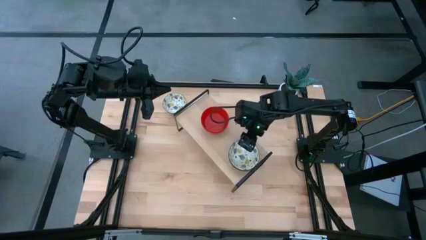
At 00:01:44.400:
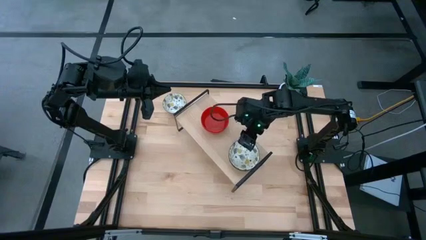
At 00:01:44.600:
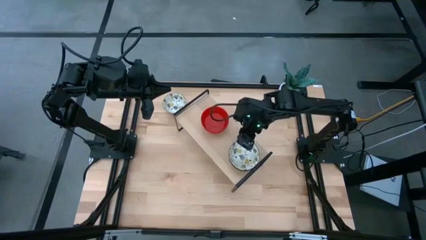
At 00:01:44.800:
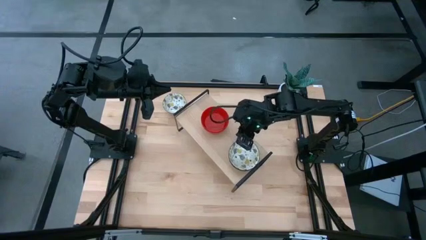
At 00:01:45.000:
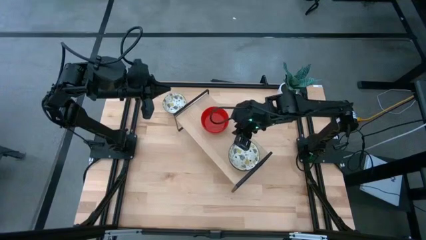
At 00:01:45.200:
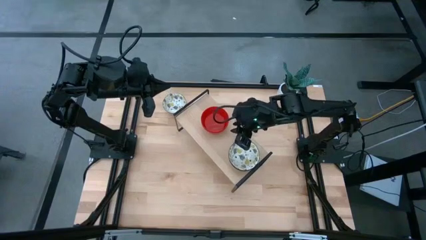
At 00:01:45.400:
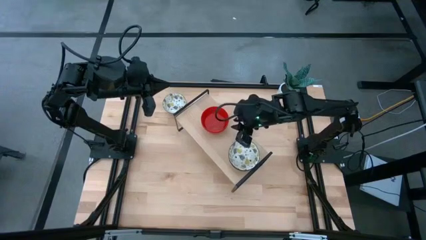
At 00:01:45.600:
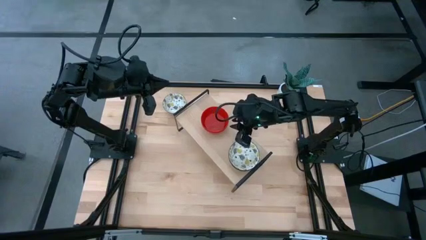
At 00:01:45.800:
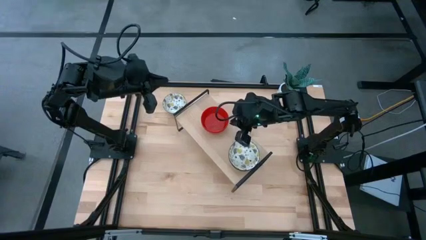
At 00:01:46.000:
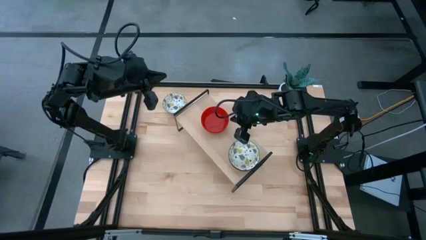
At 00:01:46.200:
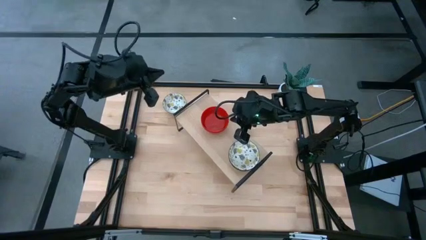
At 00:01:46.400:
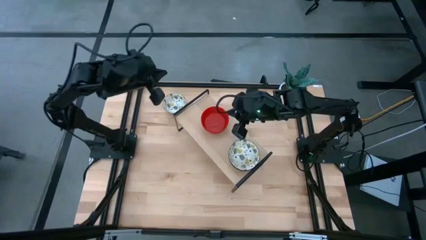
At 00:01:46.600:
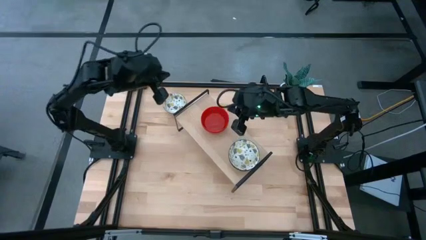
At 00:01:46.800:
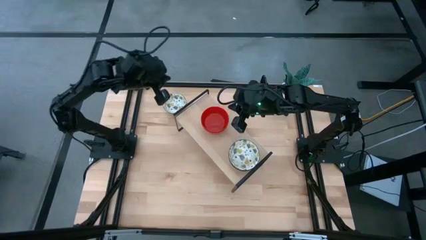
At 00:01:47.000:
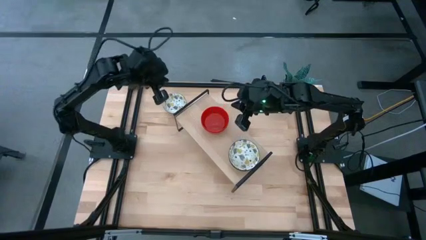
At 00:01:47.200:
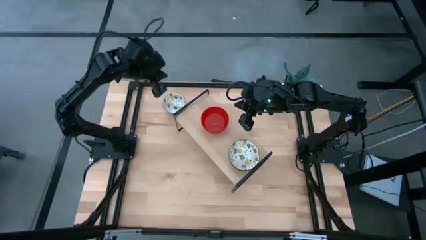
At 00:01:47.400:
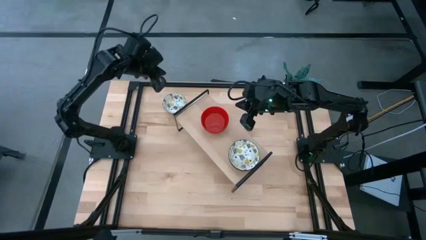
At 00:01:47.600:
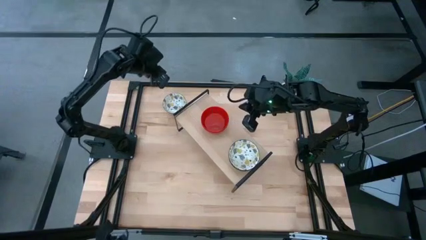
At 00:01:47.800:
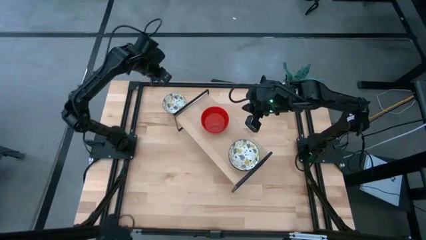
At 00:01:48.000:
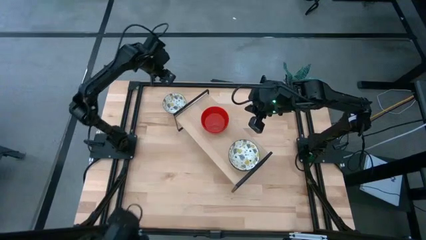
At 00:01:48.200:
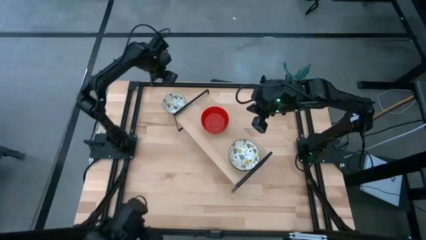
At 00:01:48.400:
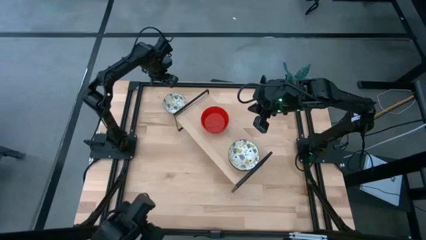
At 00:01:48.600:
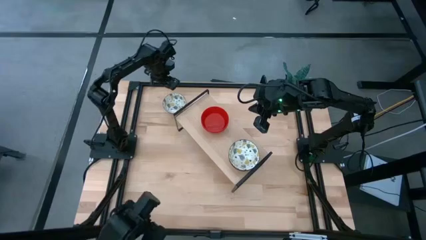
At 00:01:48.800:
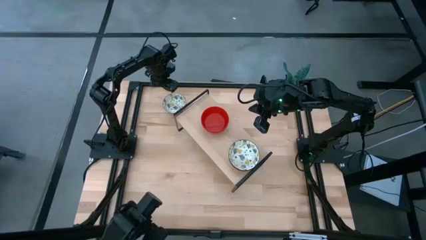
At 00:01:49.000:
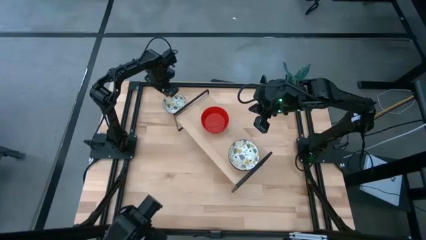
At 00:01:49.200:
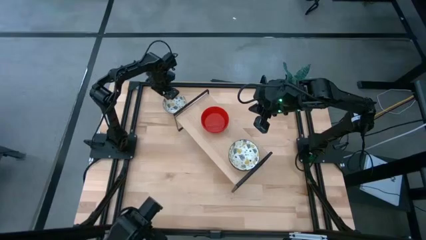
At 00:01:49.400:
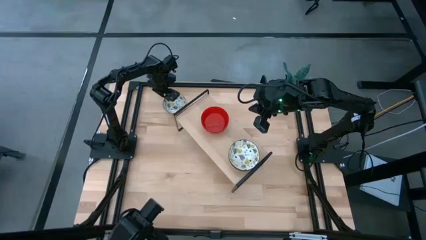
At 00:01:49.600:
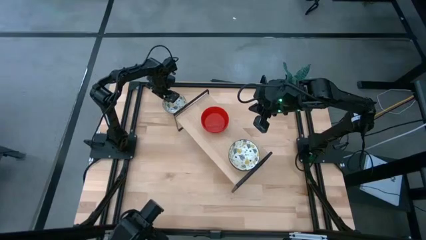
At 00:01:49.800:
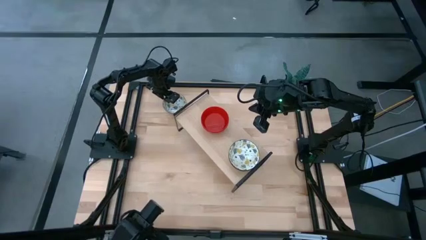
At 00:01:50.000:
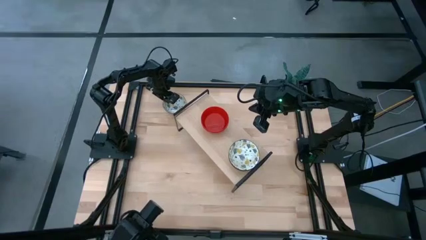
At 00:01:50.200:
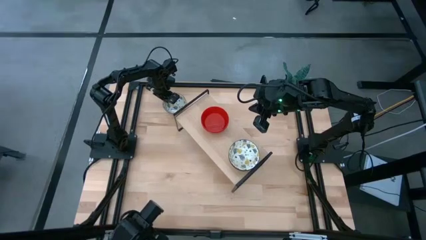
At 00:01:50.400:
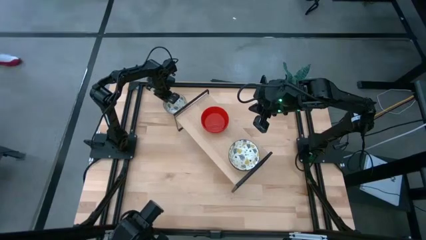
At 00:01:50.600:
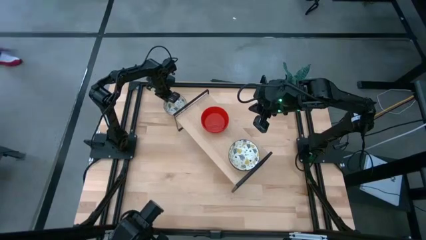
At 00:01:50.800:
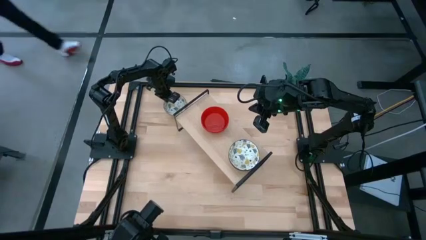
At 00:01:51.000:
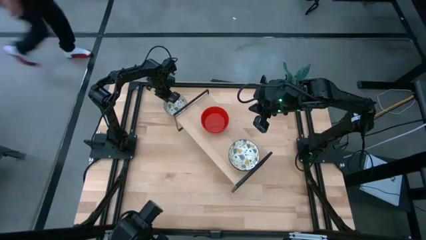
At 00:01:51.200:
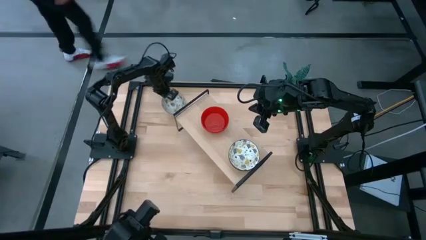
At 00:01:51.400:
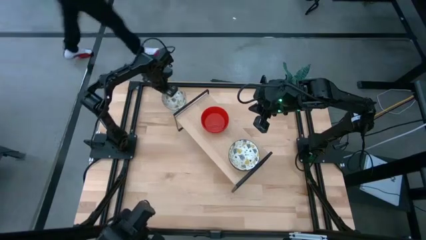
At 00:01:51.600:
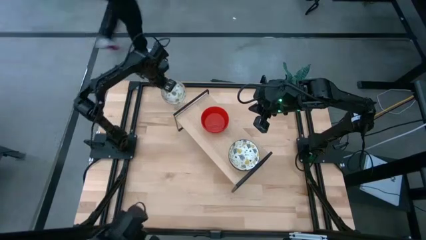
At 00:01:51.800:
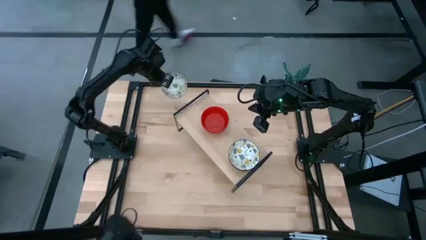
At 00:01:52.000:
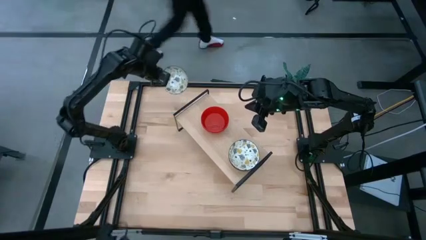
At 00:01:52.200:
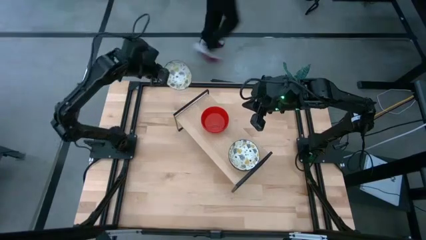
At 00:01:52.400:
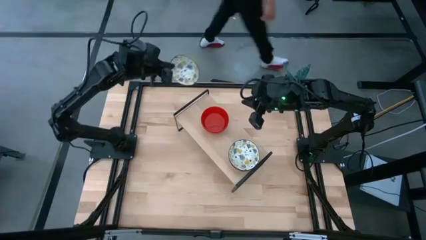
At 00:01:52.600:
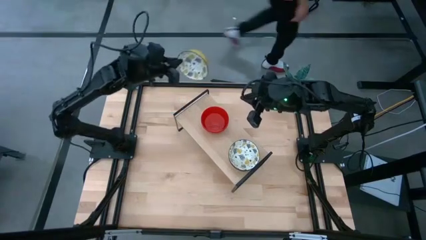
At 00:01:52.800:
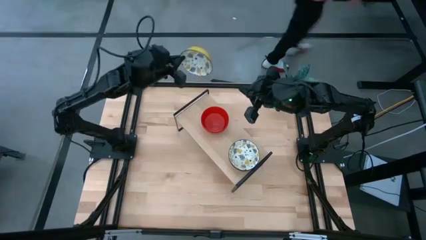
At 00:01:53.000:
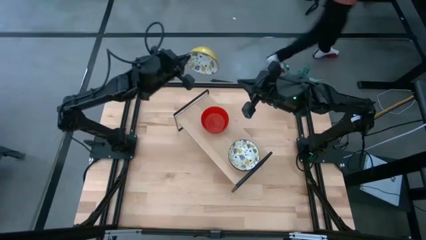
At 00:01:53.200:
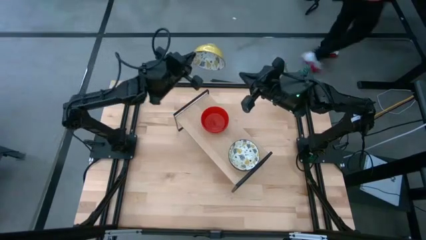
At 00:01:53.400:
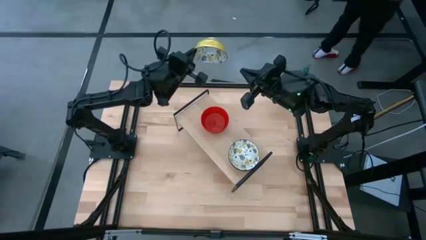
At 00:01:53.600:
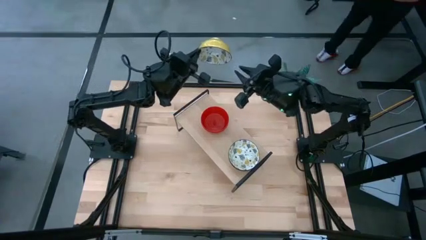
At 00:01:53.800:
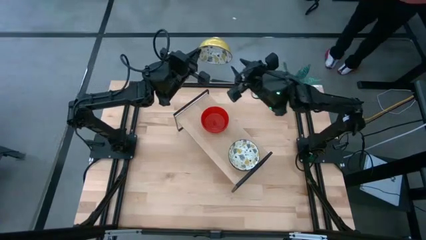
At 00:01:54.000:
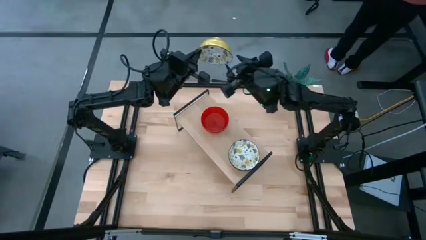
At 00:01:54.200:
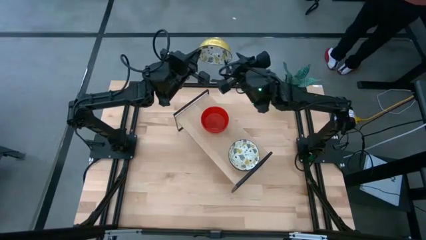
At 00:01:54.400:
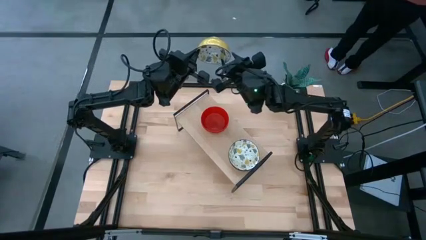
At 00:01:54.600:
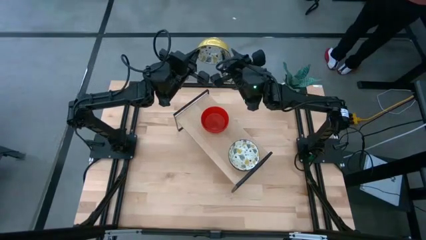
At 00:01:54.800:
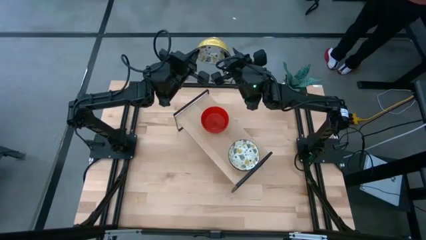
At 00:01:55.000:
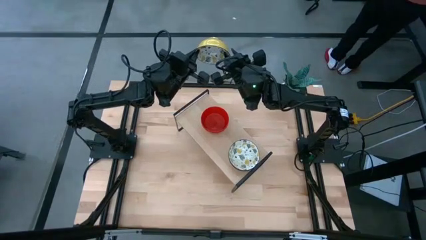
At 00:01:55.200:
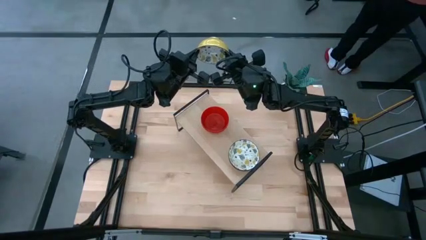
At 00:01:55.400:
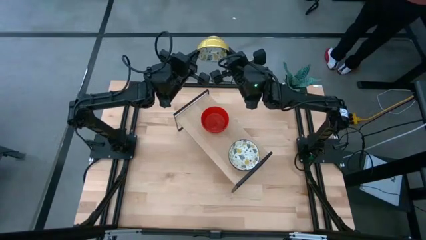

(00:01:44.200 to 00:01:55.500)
Task: Pick & Place Mini bowls
Stack the white patterned bowl on top of the other white patterned bowls on the shelf
